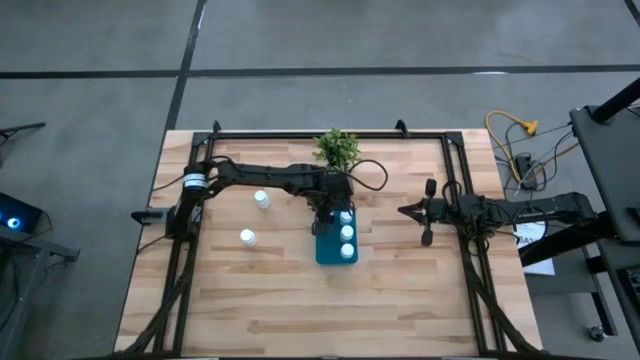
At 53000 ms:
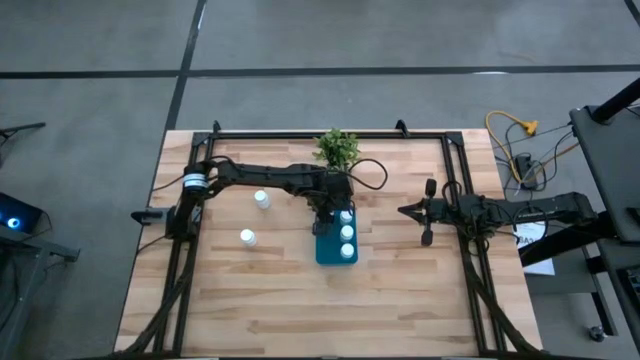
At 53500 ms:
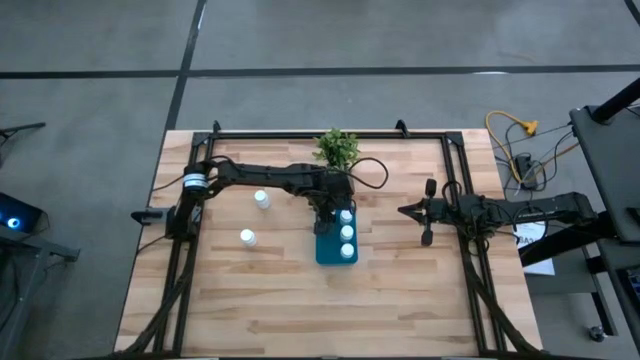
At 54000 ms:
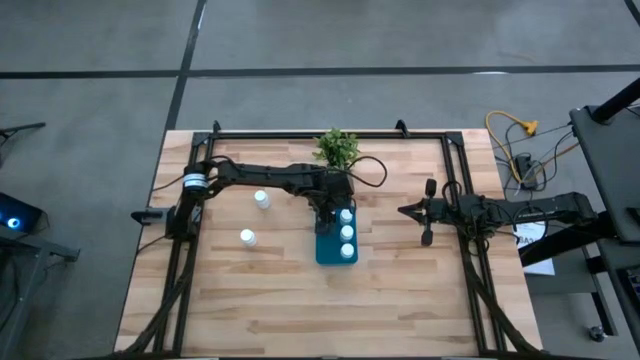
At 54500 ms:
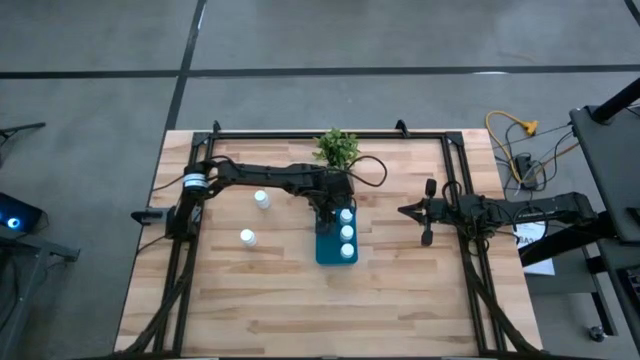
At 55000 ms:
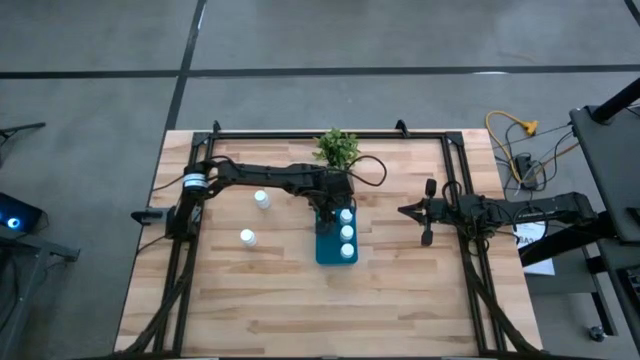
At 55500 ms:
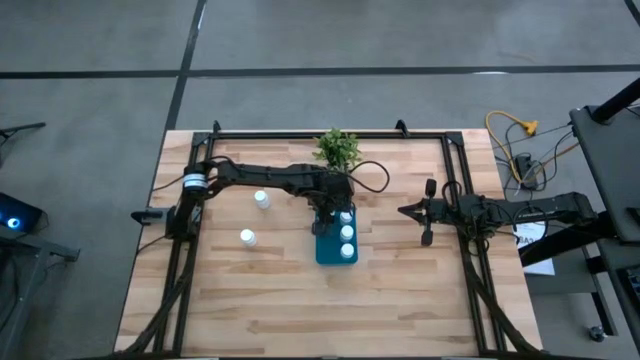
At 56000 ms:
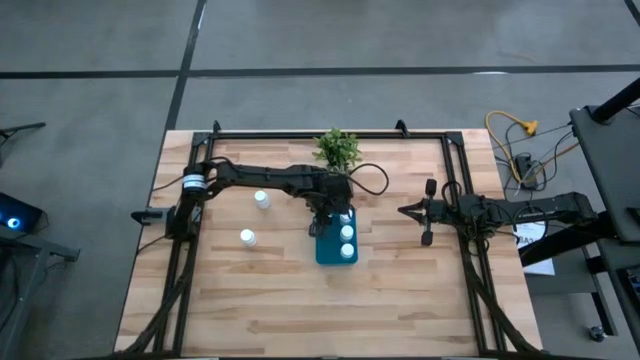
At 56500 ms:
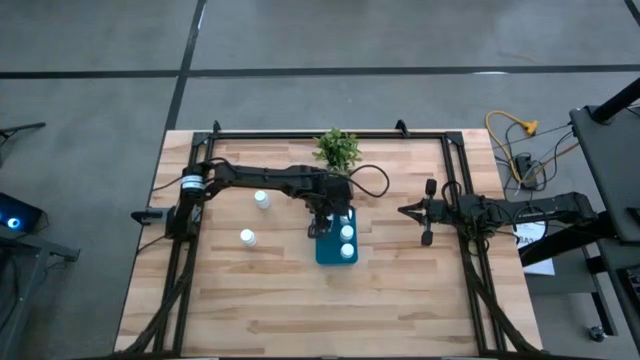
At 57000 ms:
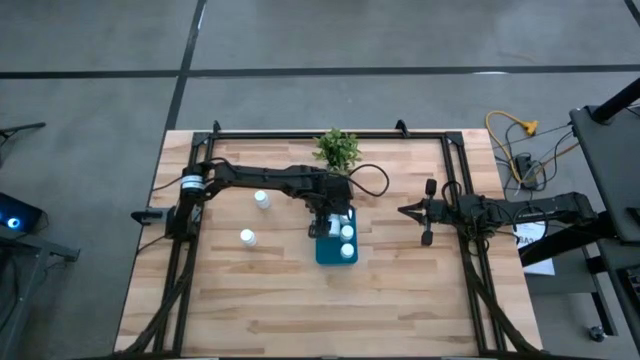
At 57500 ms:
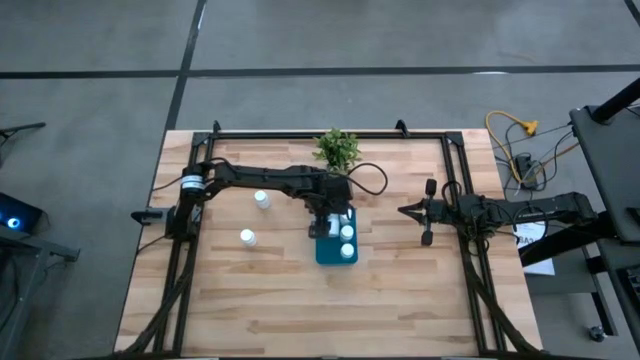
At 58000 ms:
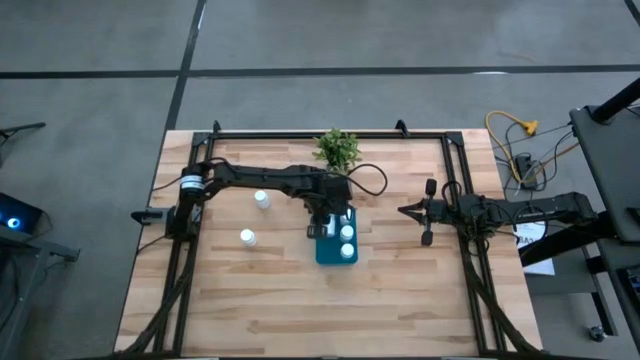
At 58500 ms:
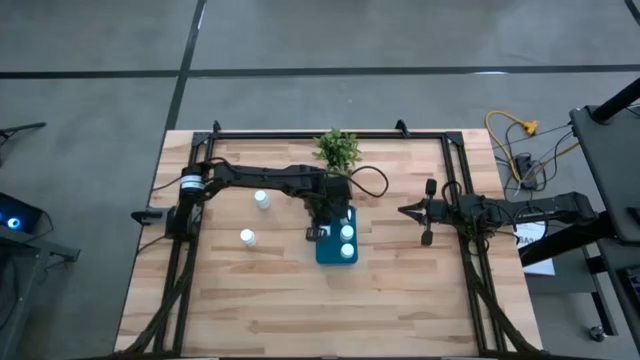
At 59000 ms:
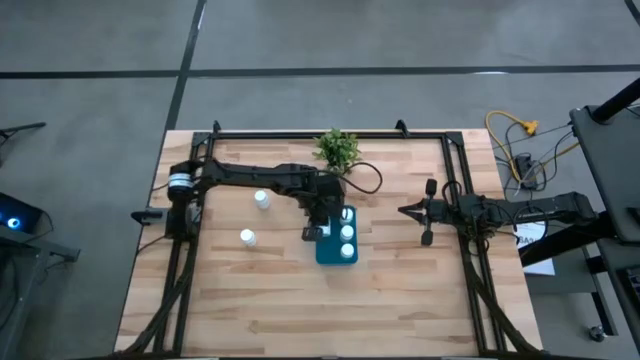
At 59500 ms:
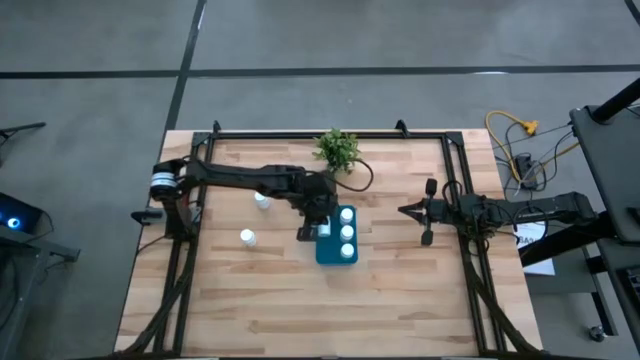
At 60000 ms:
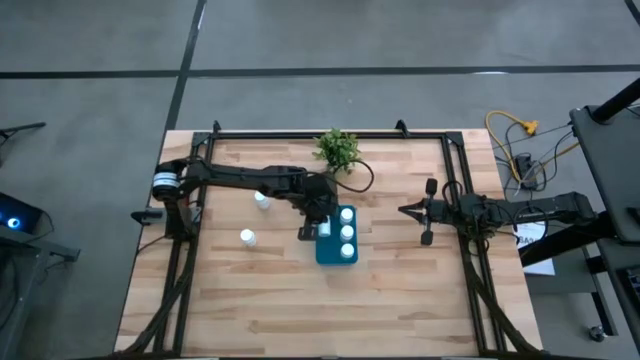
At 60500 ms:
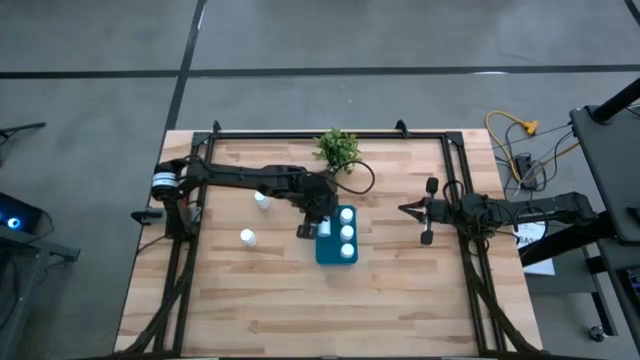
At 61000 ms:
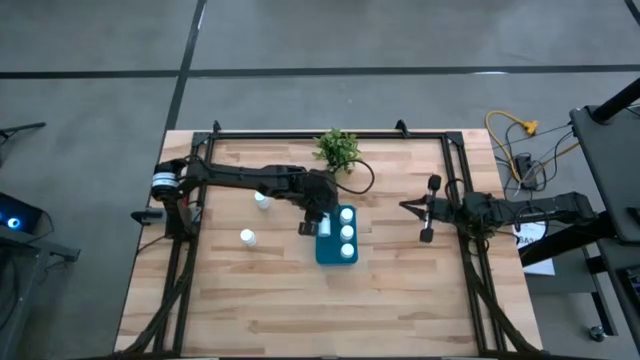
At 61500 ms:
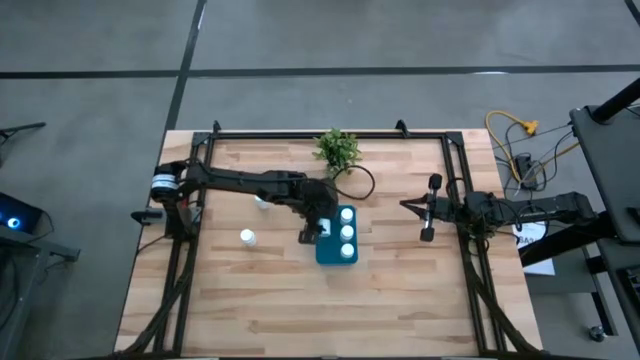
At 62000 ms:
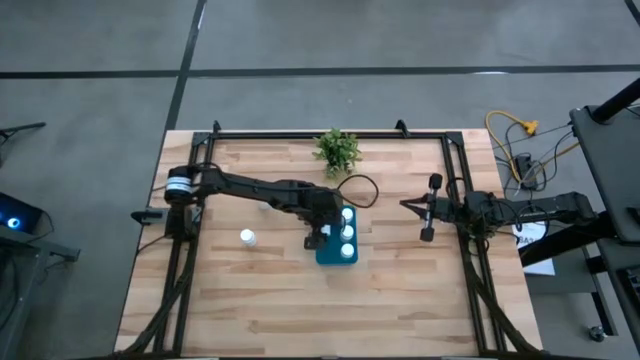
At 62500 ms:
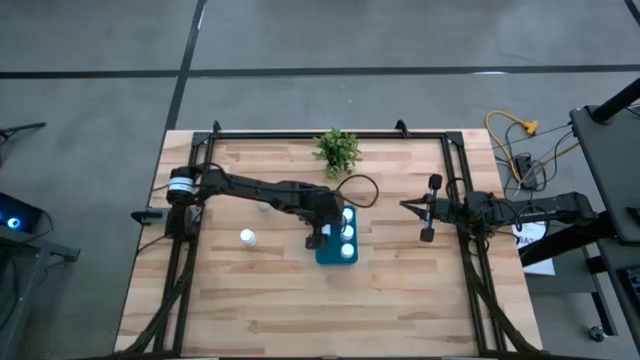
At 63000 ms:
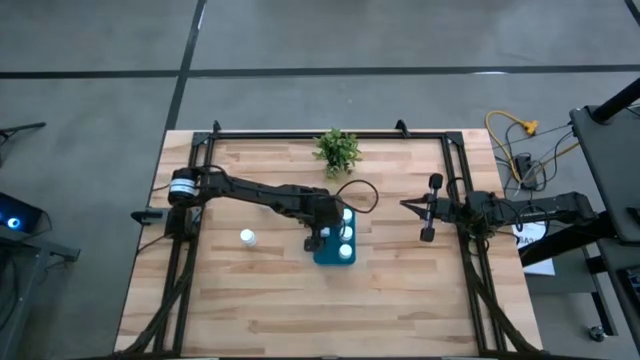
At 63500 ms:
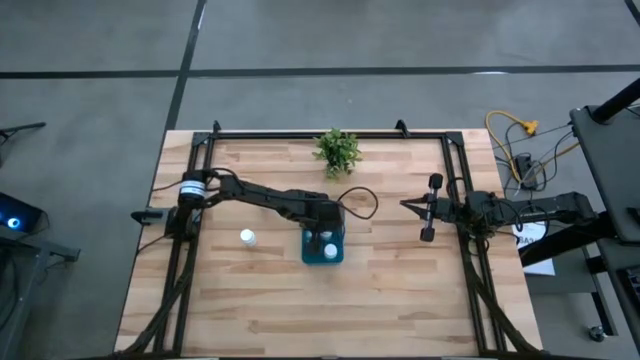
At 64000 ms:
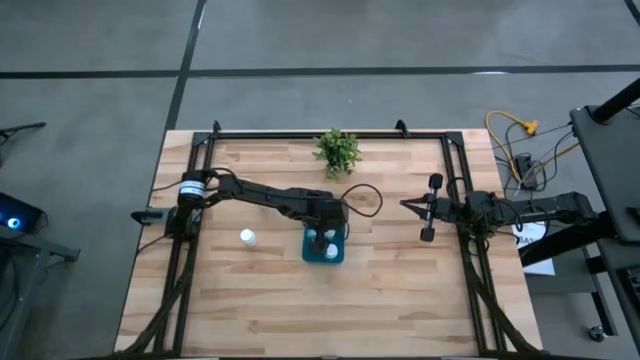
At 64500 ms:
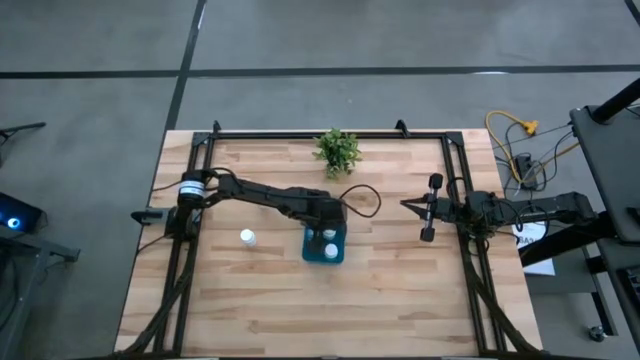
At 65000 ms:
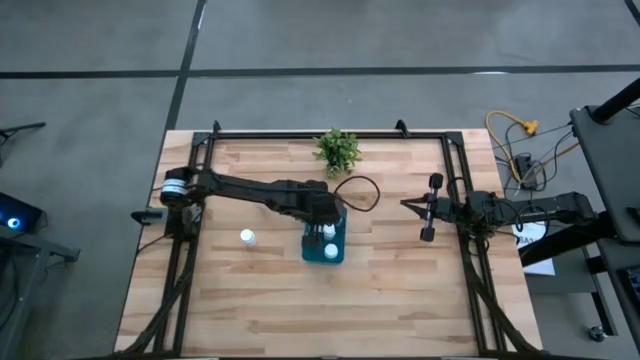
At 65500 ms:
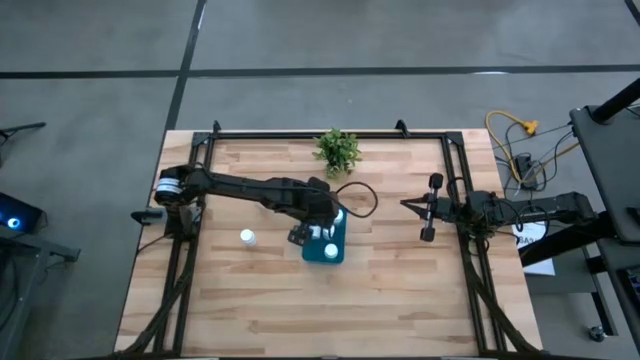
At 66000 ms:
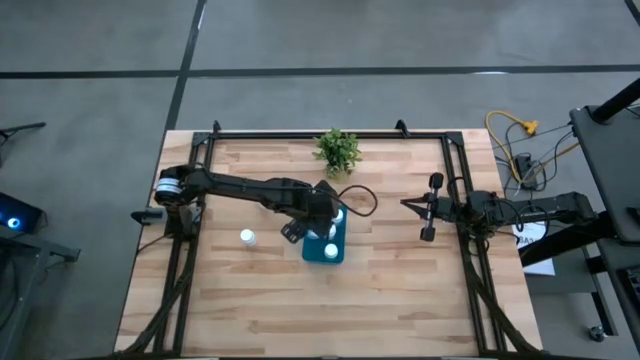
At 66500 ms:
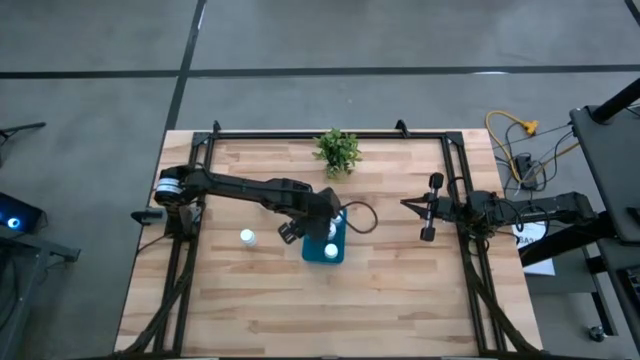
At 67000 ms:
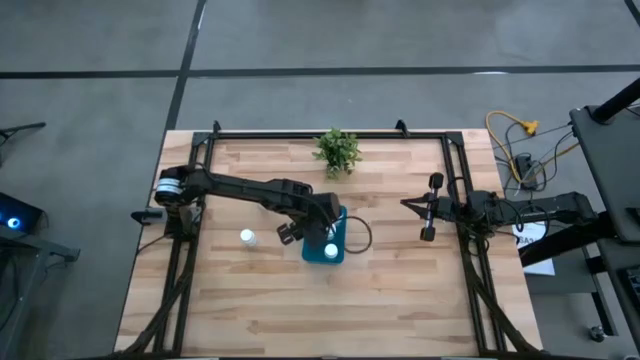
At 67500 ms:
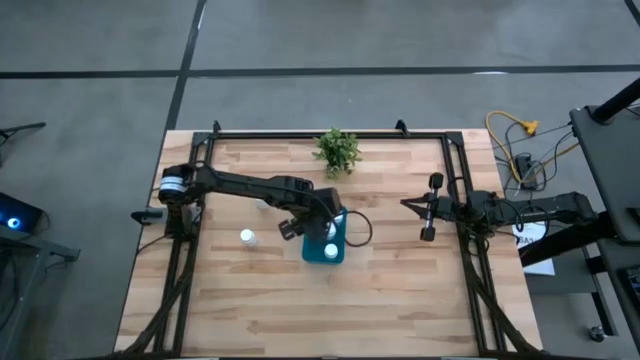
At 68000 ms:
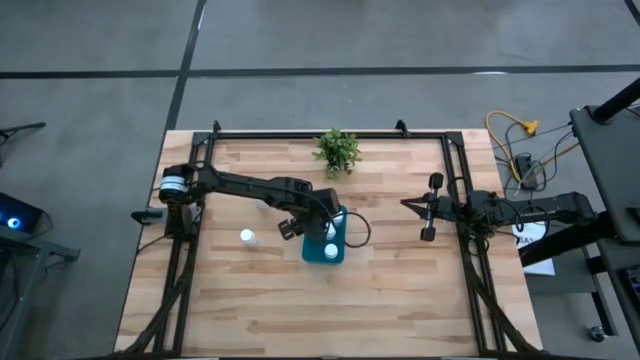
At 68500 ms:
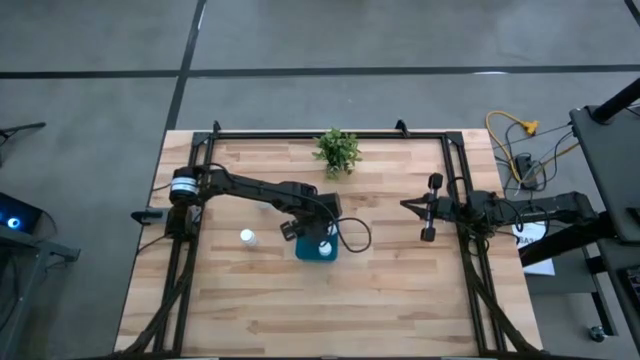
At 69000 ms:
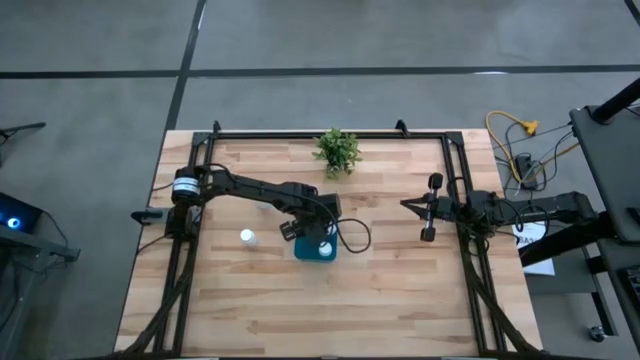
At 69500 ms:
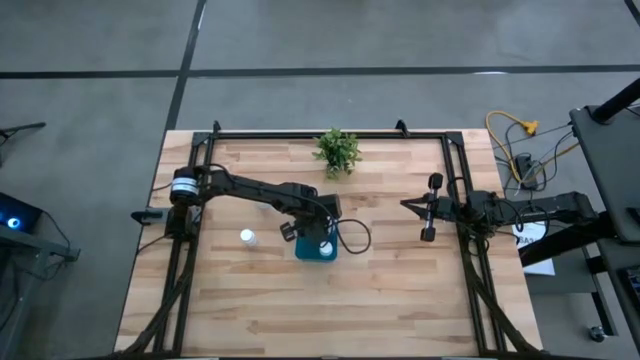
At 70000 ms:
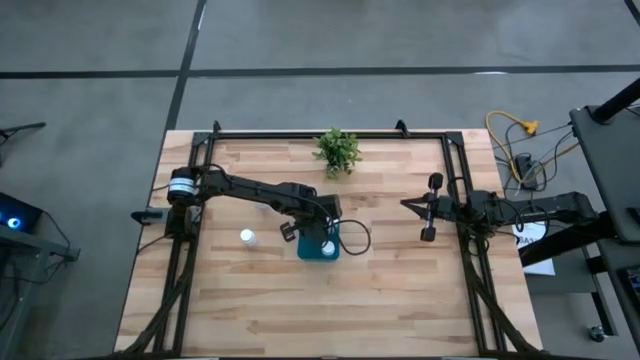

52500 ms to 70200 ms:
Task: Pick and place pill bottles into a basket
Put the white medicine bottle into the blue bin
